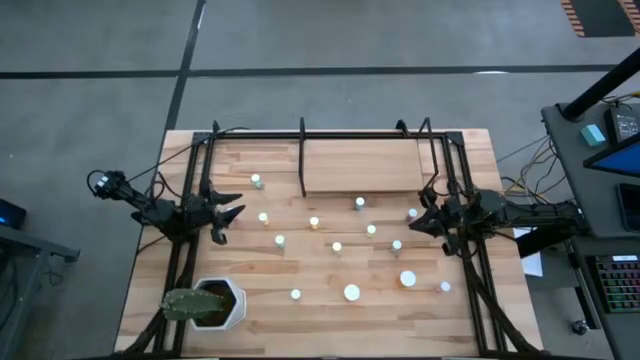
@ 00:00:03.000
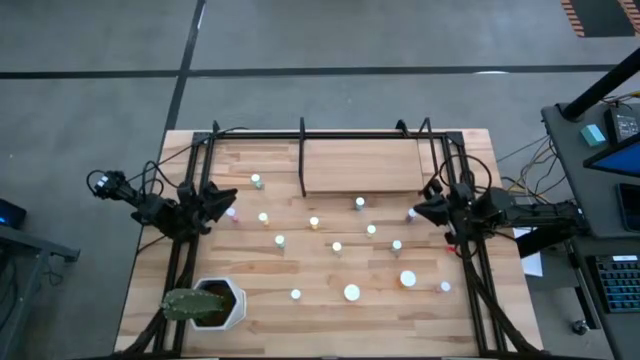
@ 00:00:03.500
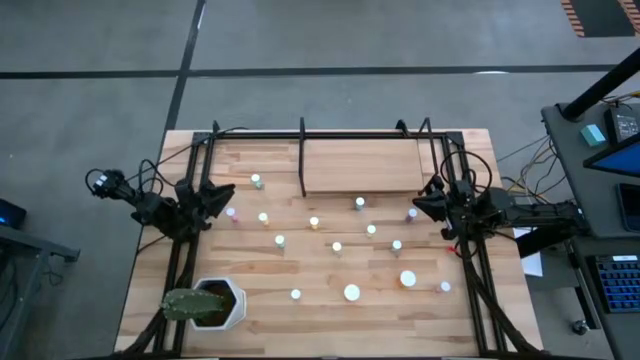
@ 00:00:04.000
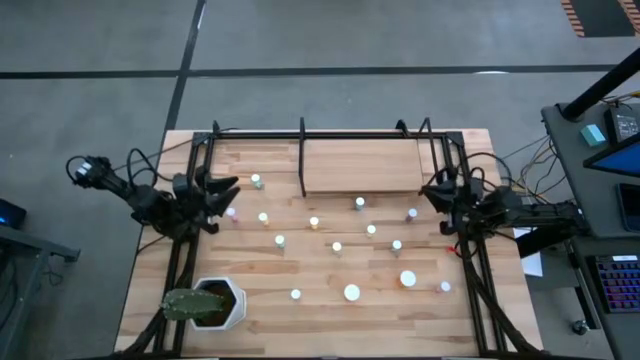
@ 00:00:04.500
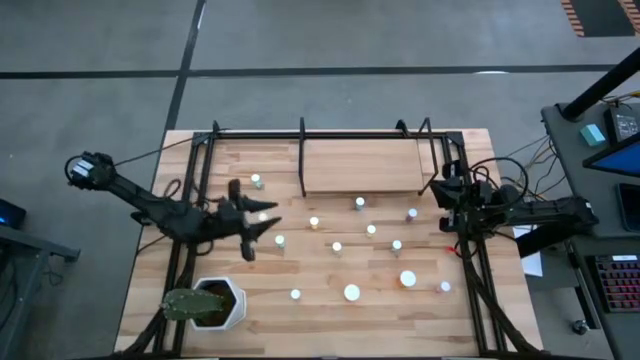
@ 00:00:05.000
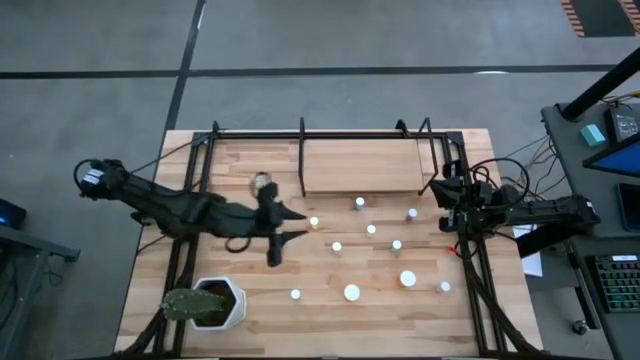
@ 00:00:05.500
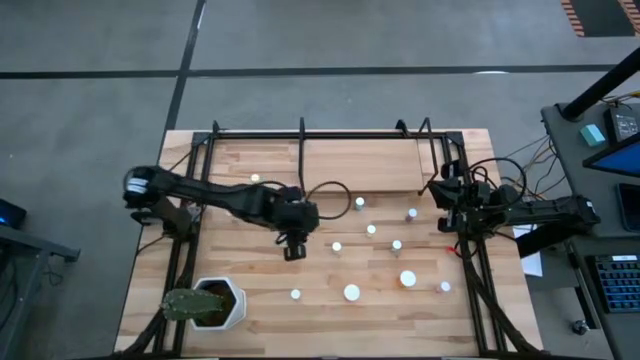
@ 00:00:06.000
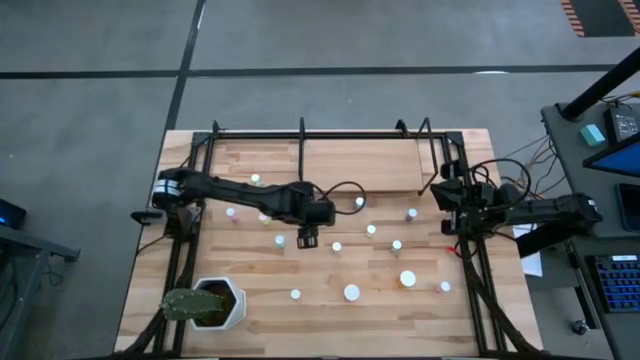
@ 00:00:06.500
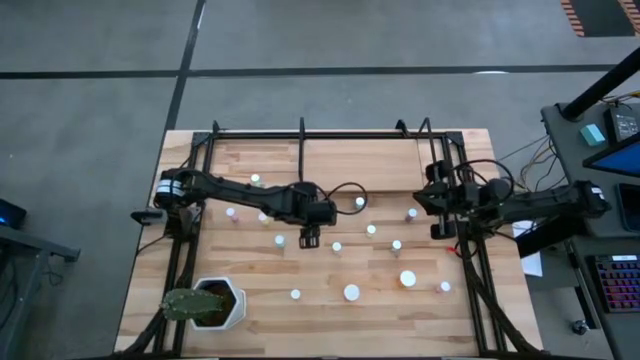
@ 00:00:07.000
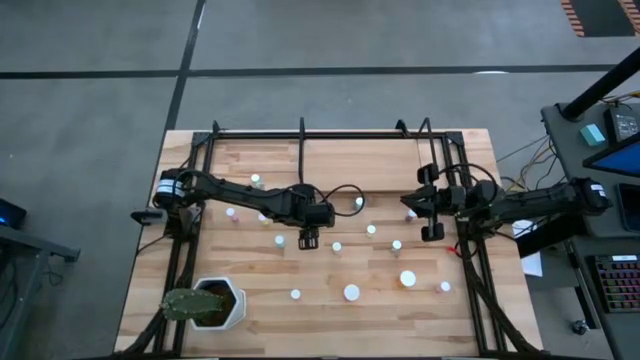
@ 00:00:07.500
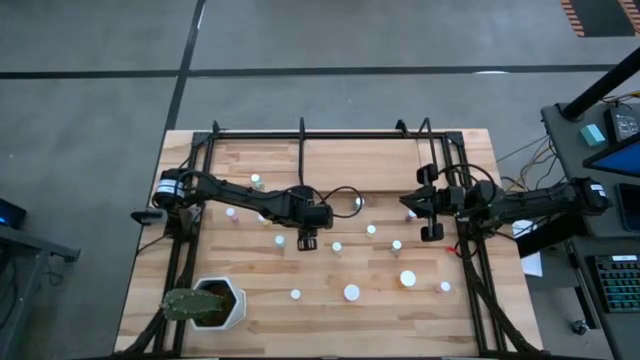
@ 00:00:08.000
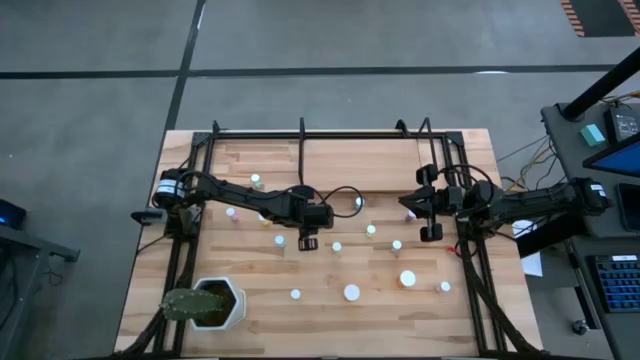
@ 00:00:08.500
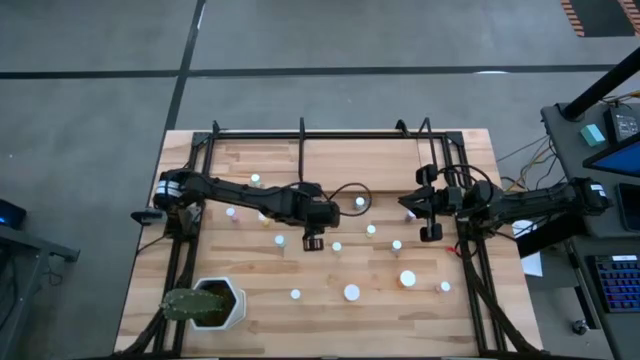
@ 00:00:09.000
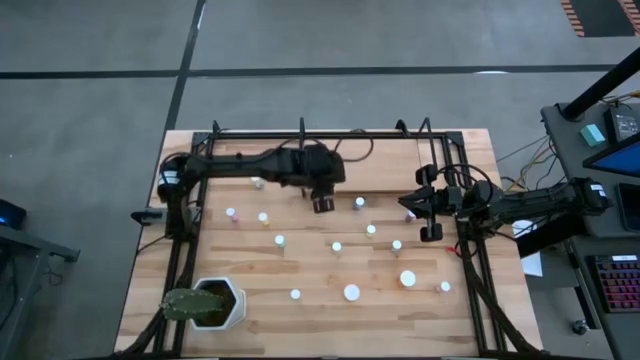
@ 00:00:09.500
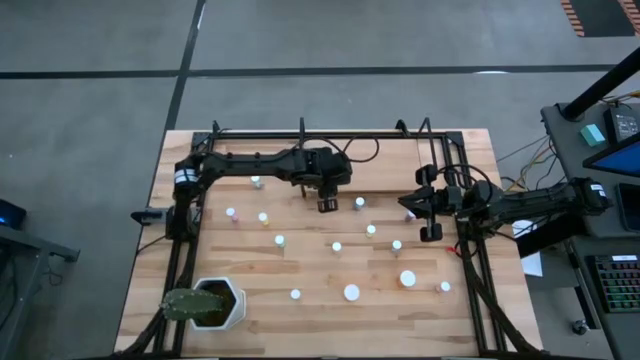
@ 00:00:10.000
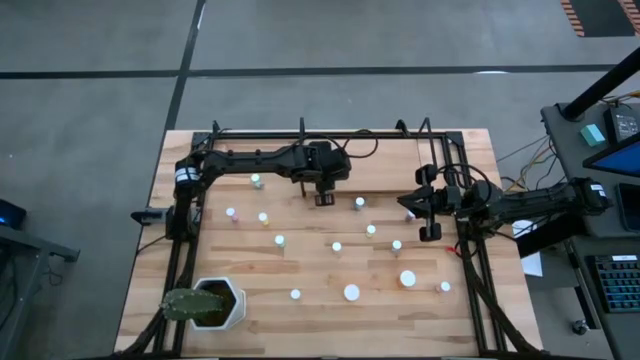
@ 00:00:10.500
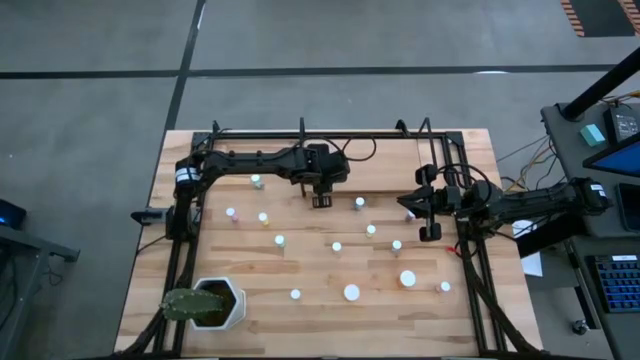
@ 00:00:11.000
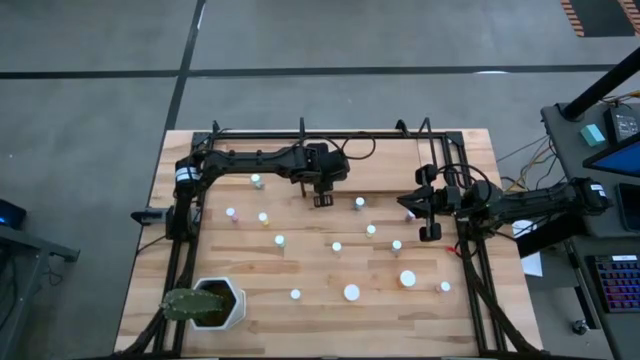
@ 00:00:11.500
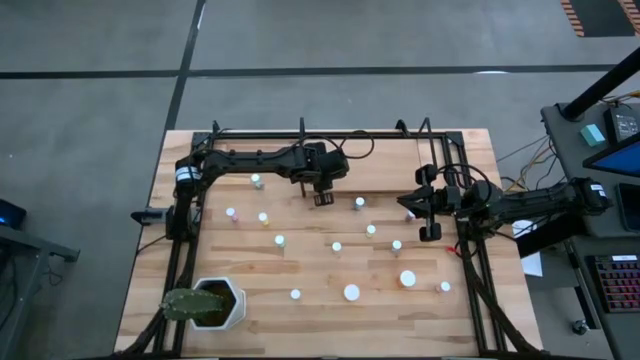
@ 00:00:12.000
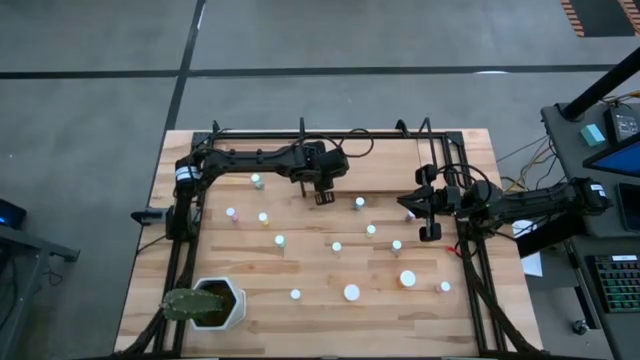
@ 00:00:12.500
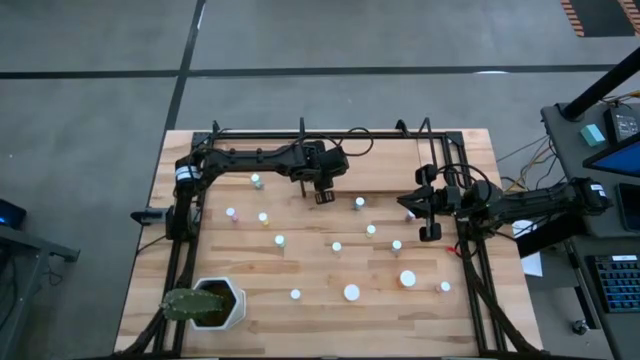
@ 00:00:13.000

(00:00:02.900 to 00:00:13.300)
Task: Pick and place medicine bottles onto shelf by color
Put the yellow pill bottle on the shelf

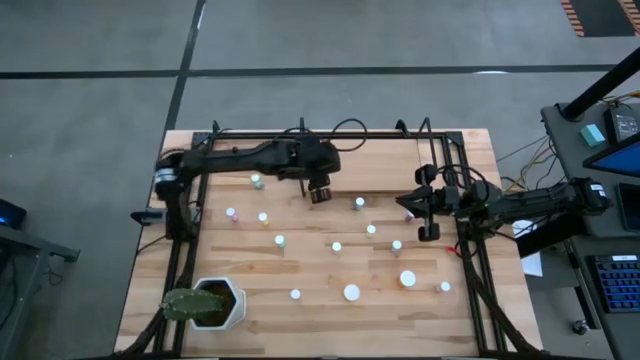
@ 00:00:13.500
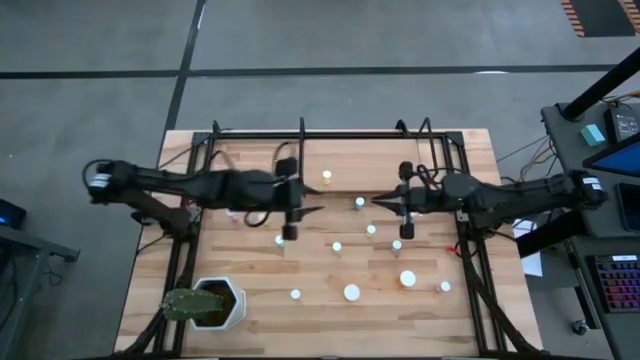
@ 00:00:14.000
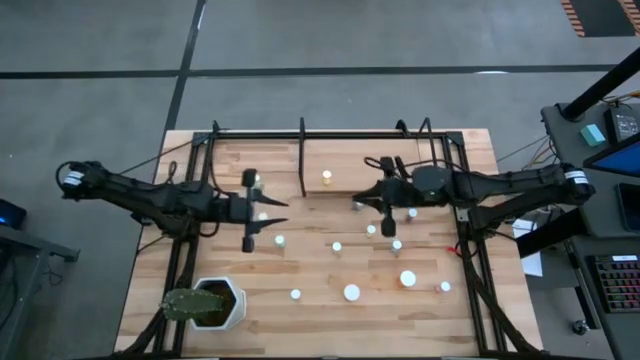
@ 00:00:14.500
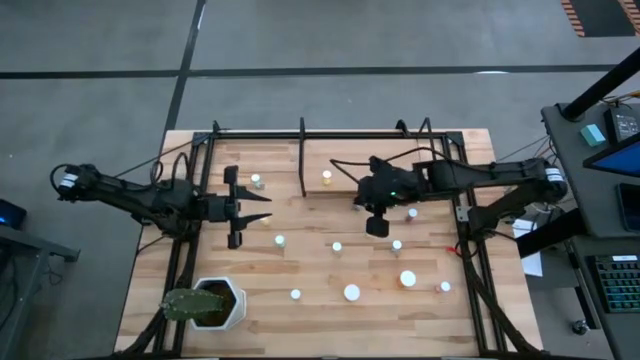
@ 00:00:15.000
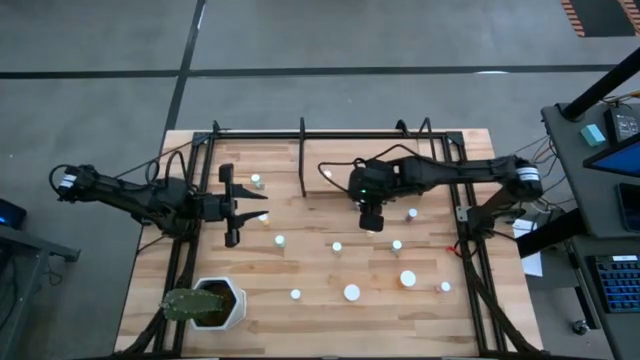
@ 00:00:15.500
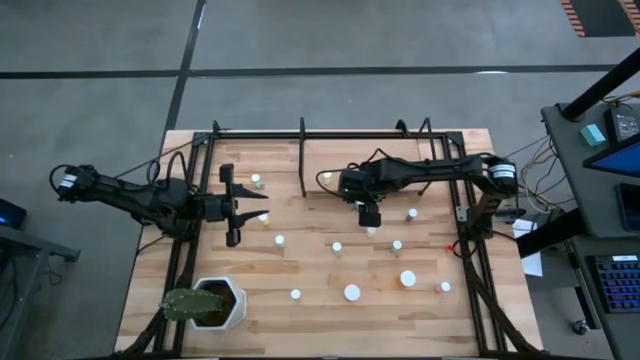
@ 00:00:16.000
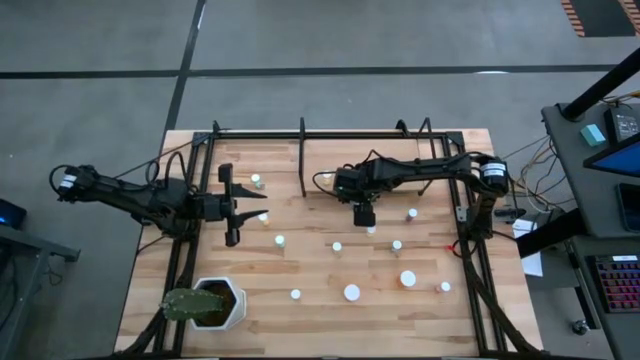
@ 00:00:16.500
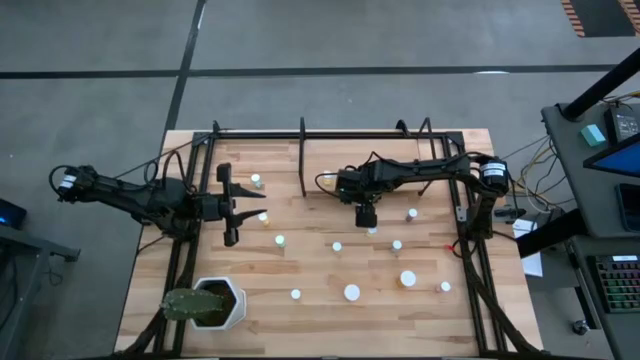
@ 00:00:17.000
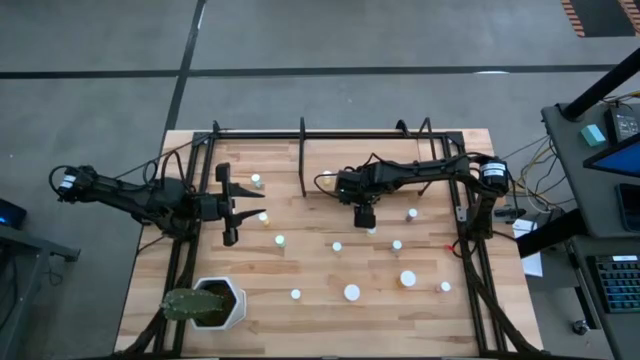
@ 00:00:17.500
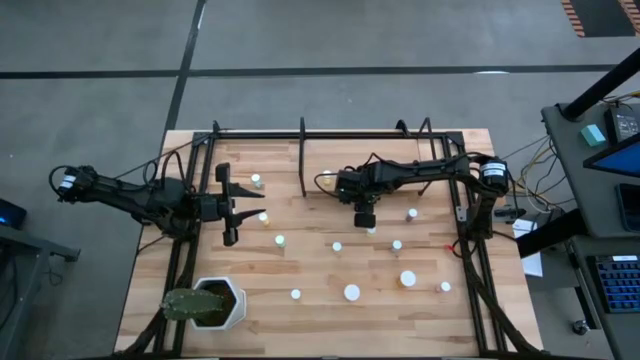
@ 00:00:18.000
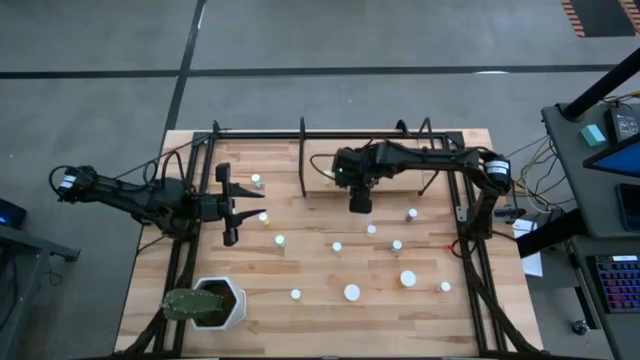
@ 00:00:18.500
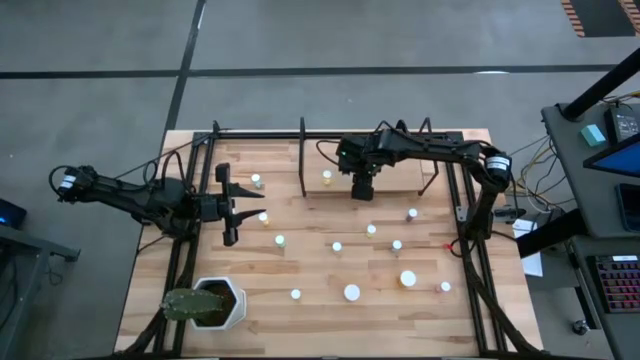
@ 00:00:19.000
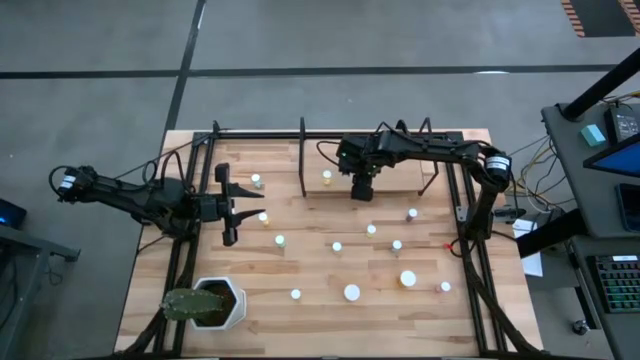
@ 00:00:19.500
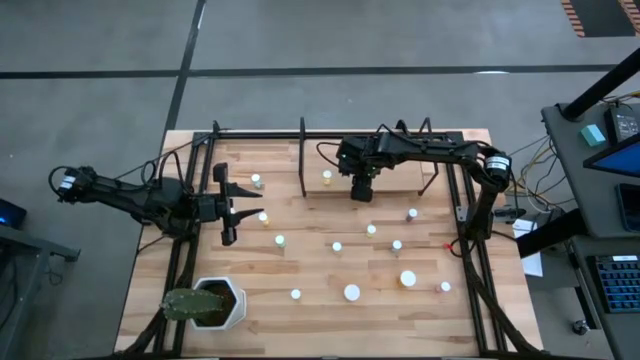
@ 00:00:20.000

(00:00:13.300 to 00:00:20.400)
Put the blue pill bottle on the shelf

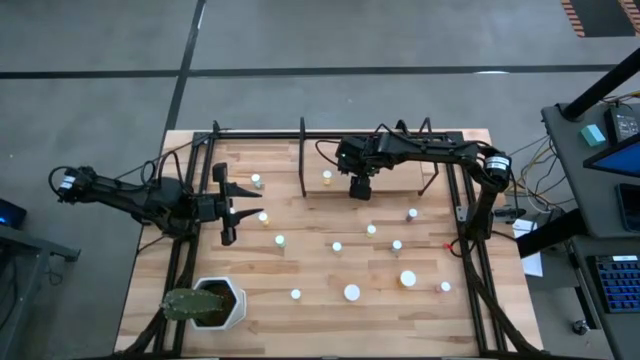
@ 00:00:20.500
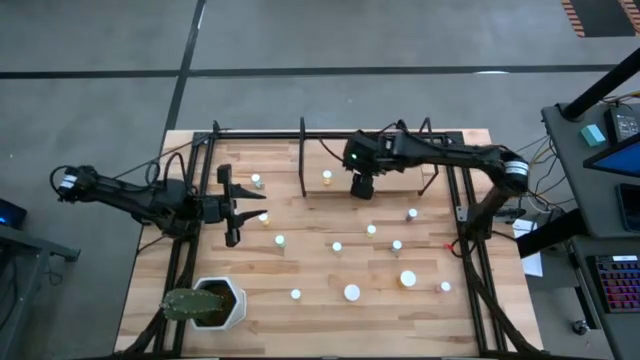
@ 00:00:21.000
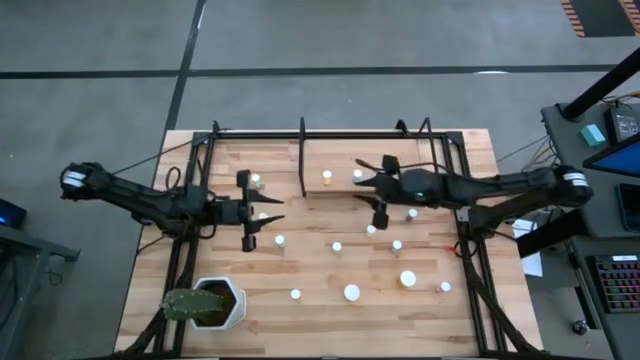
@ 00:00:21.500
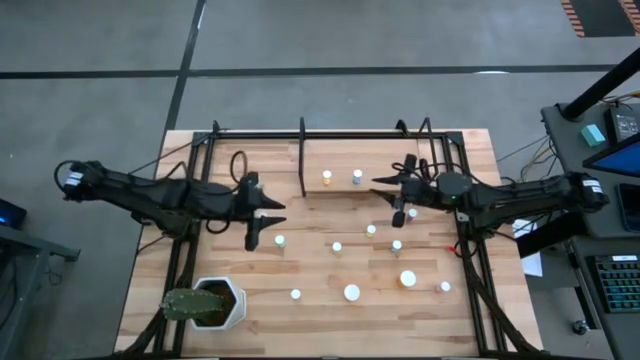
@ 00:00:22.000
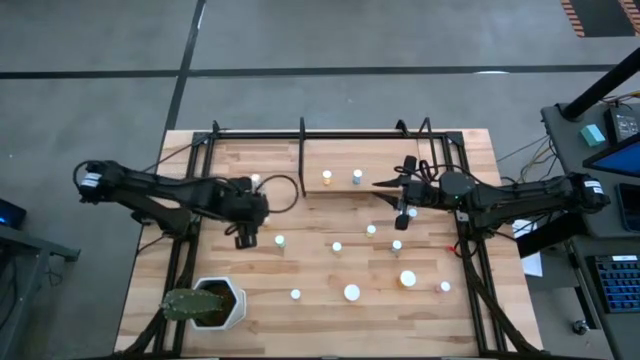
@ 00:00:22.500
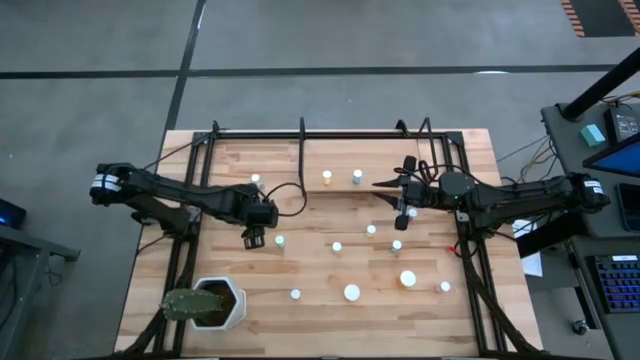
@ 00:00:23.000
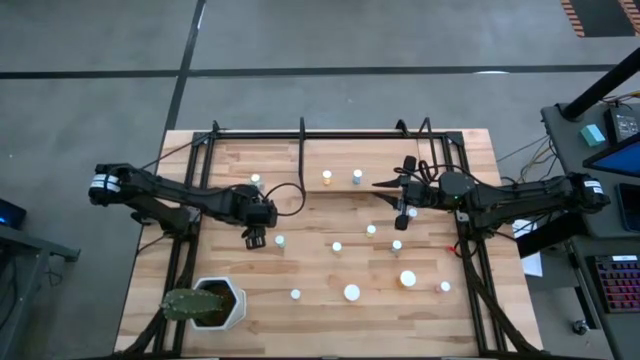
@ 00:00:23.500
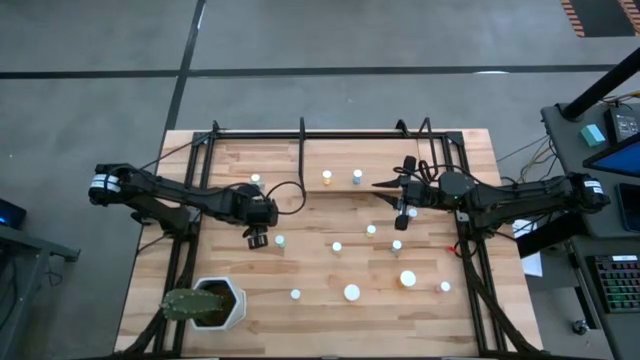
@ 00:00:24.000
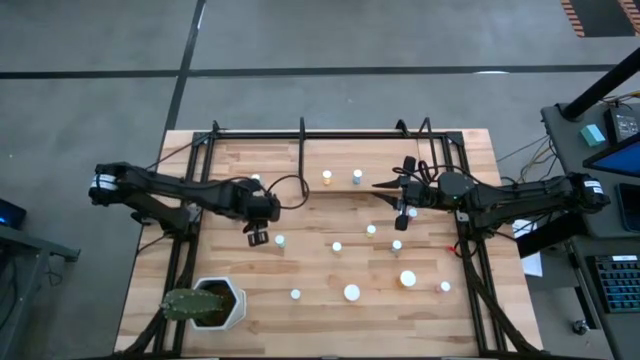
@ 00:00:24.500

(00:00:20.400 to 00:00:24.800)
Put the yellow pill bottle on the shelf aligned with the other yellow pill bottle
